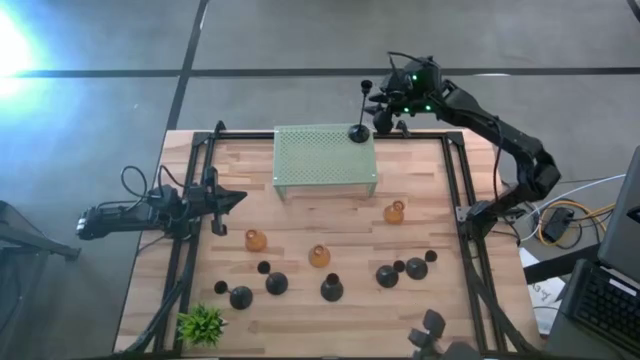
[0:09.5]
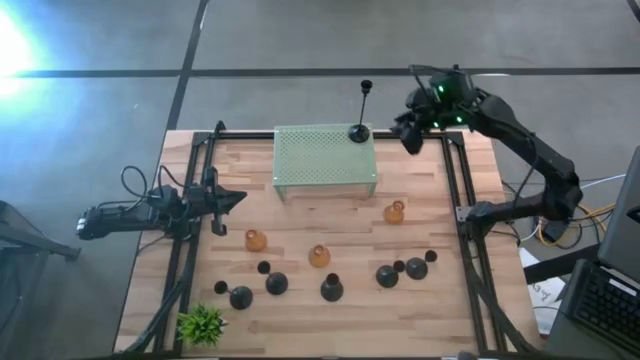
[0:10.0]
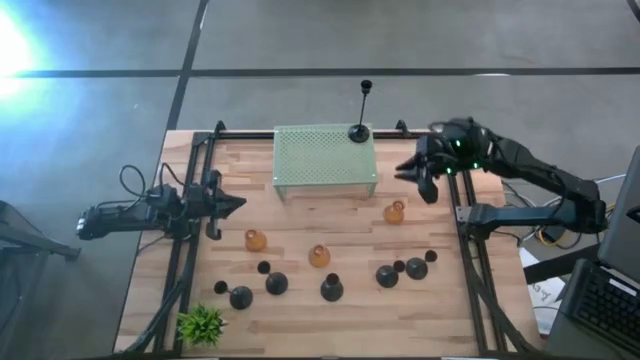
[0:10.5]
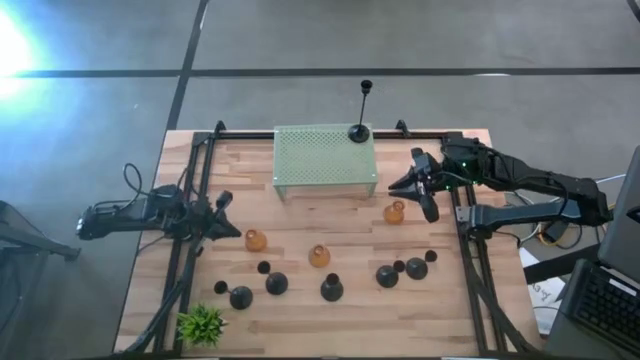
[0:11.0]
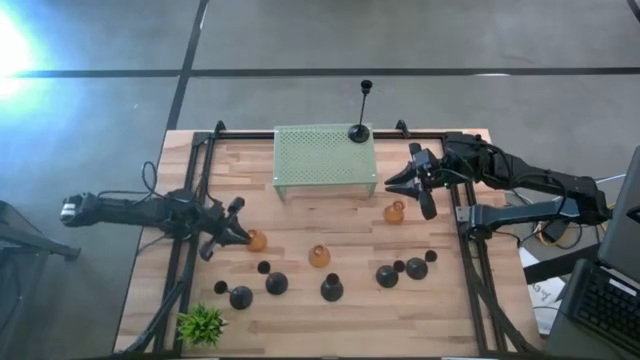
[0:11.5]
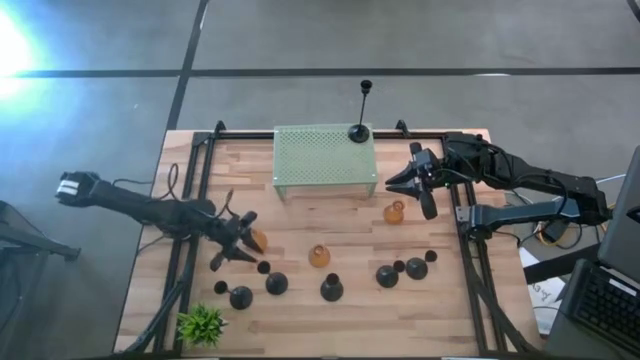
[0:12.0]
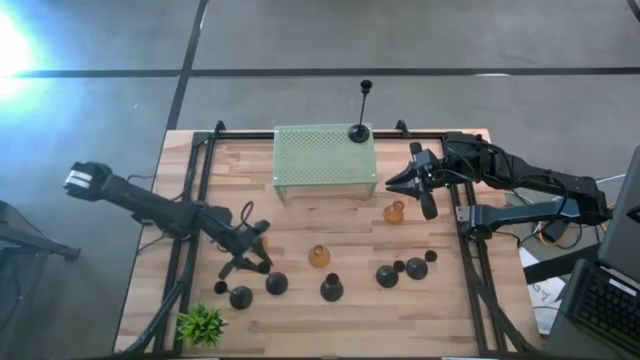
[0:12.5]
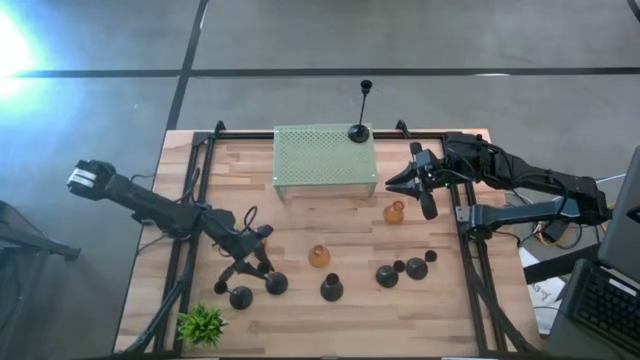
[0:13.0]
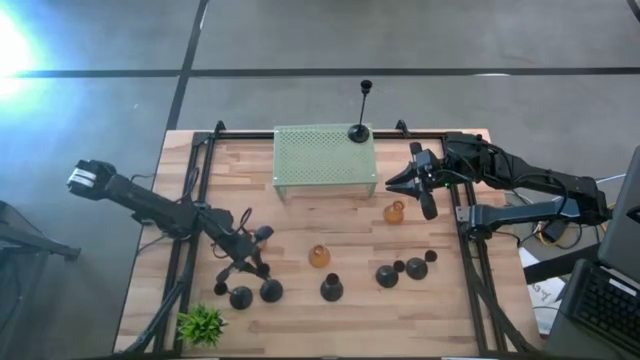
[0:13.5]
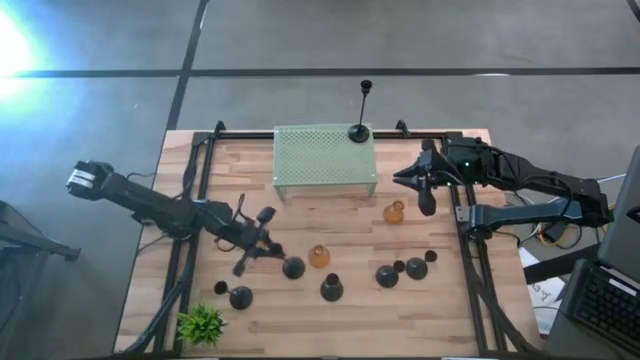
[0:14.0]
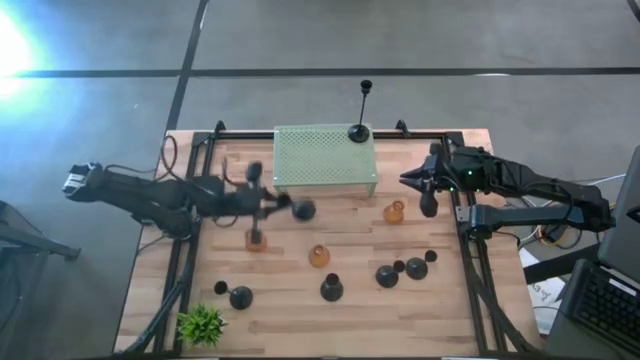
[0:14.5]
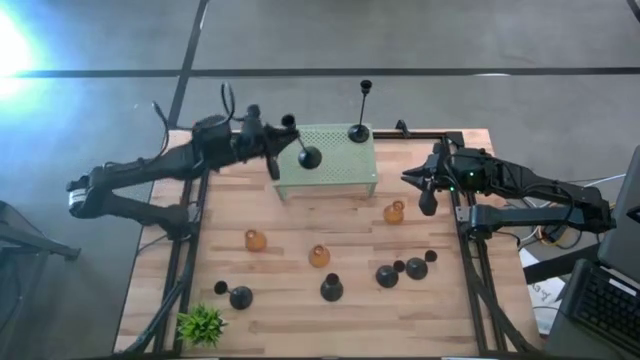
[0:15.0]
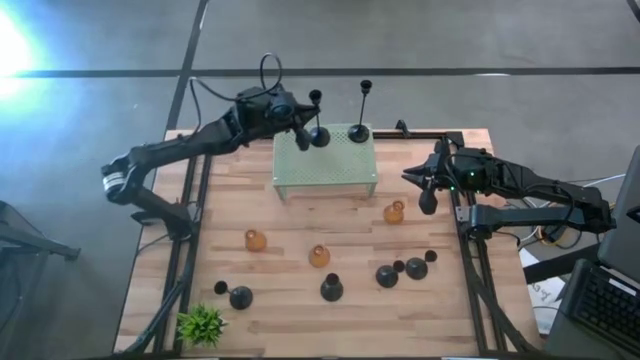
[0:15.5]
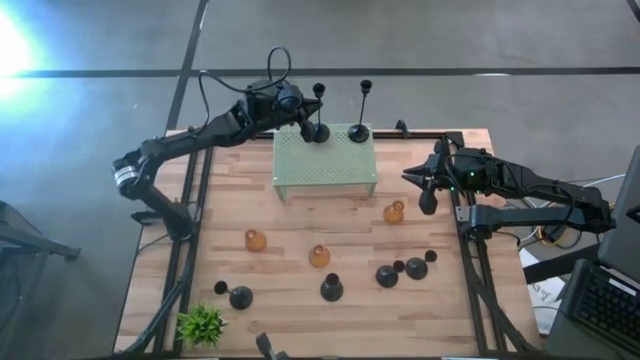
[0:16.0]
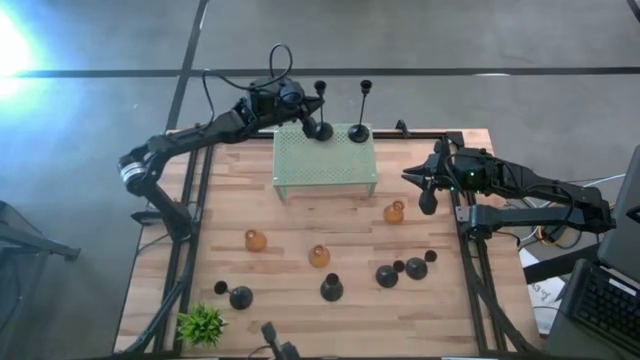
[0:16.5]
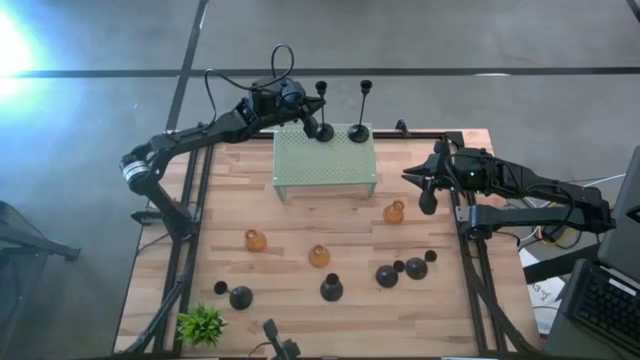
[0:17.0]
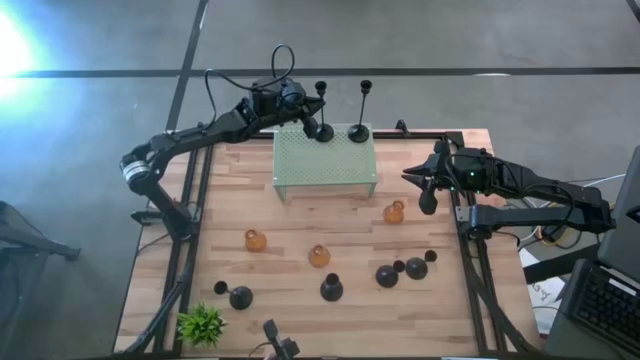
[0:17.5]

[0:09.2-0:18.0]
Task: Pick & Place candle stick holders
Align the large black candle holder with the other large black candle holder on the shelf

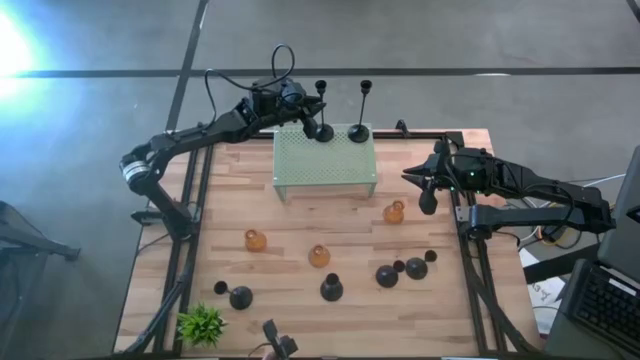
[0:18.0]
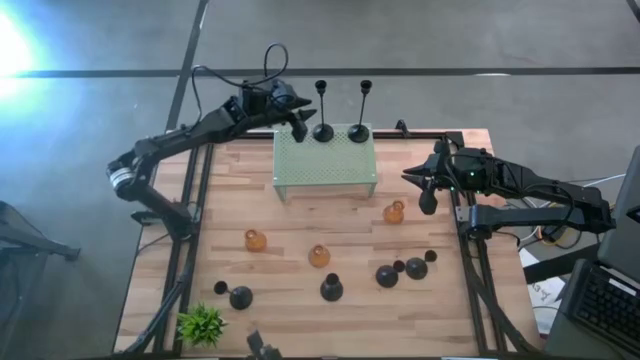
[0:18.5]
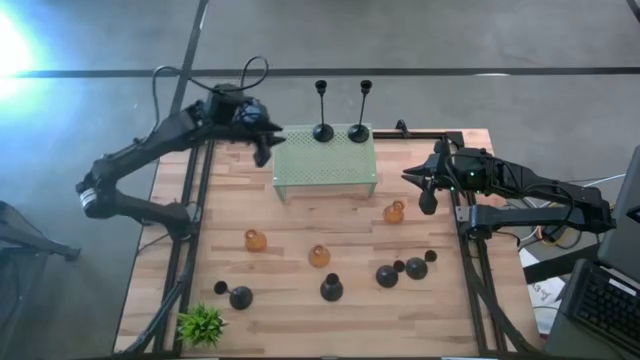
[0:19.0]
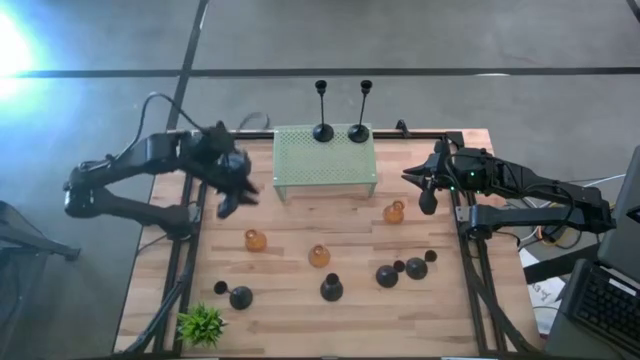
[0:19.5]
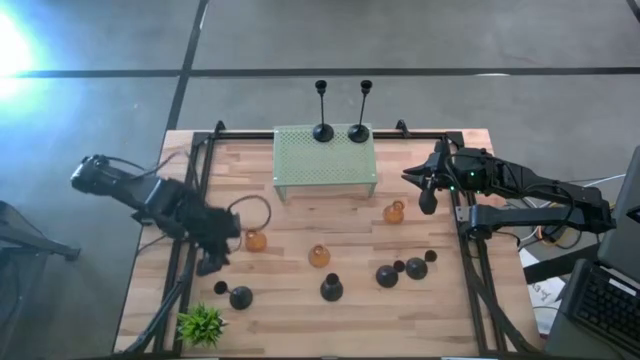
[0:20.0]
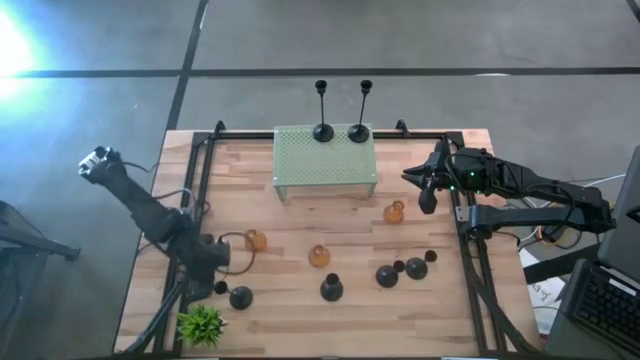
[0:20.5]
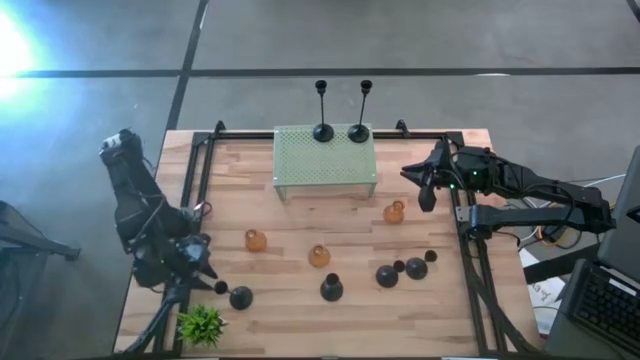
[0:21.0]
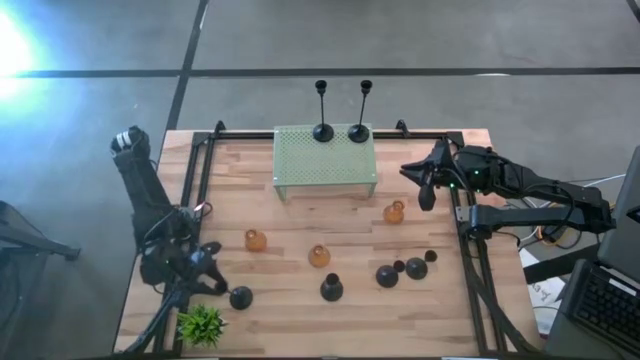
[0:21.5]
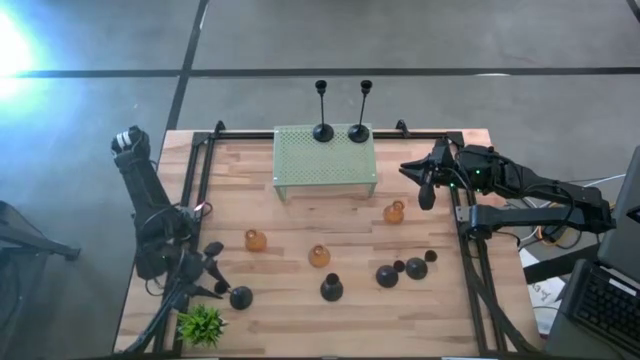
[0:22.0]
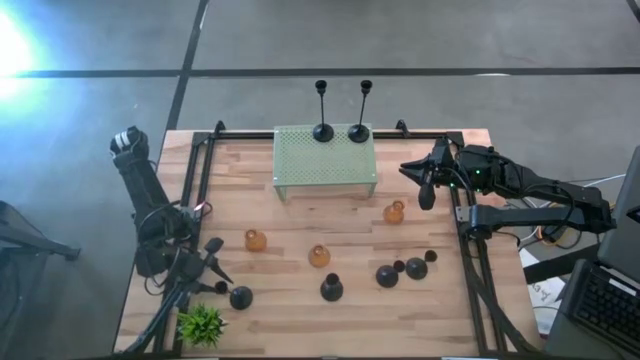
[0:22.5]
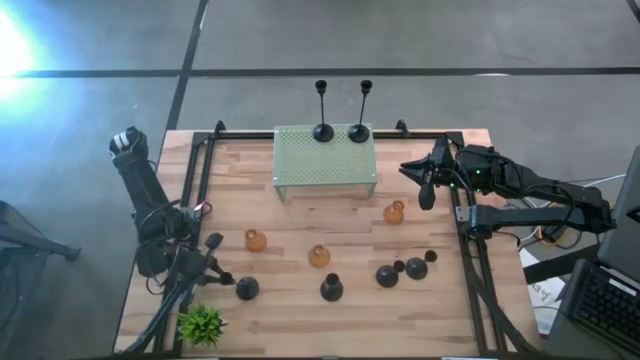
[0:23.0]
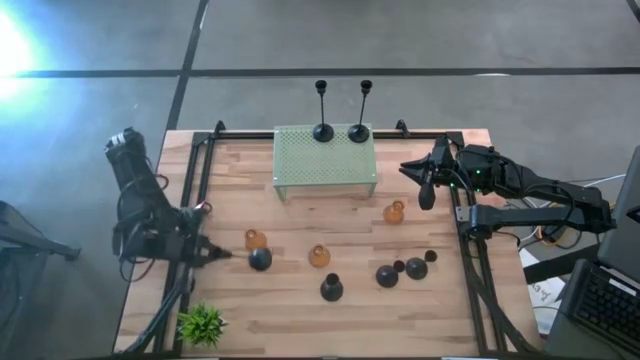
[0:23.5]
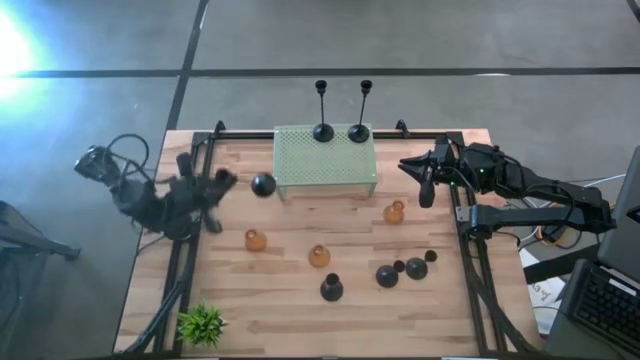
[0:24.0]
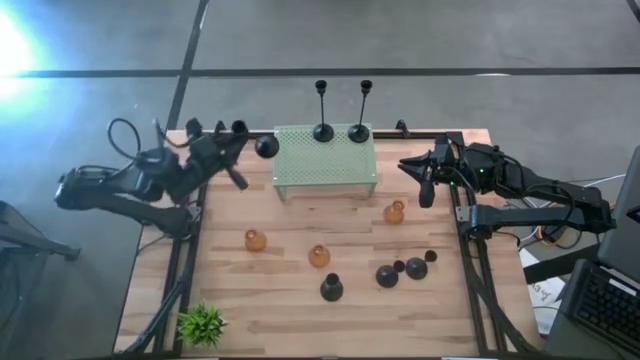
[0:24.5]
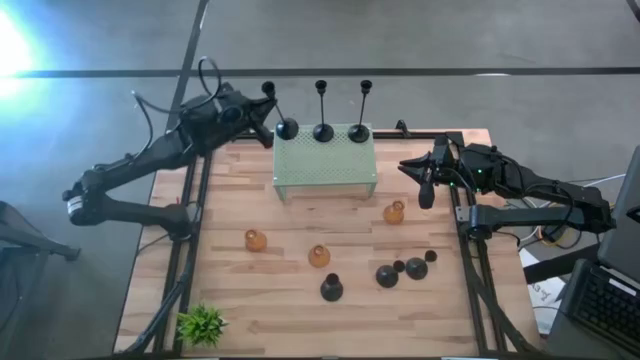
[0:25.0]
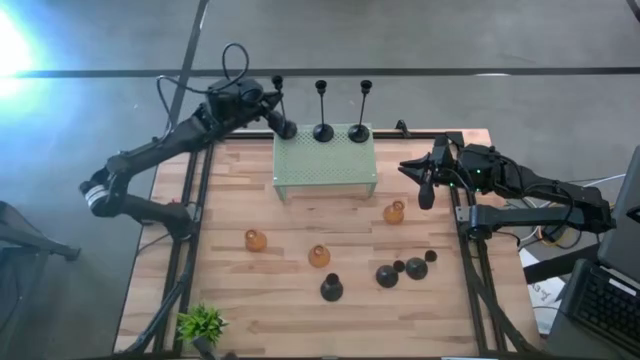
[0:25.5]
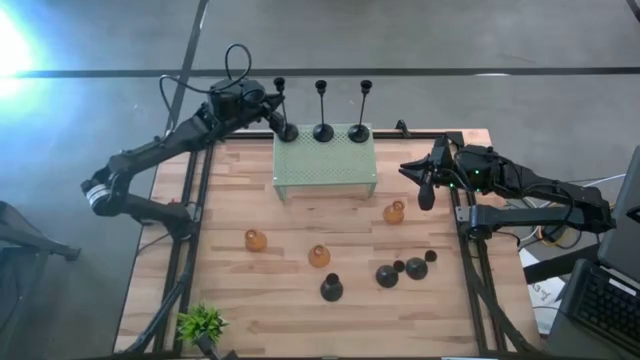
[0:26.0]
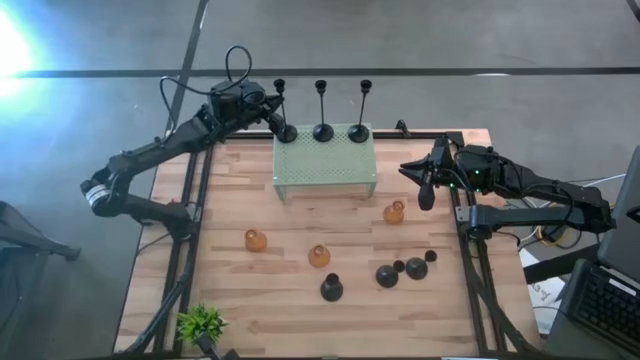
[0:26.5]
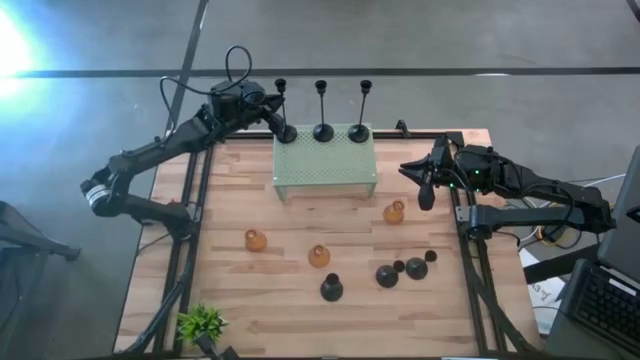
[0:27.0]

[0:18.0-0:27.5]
Align the large black candle holder with the other large black candle holders on the shelf

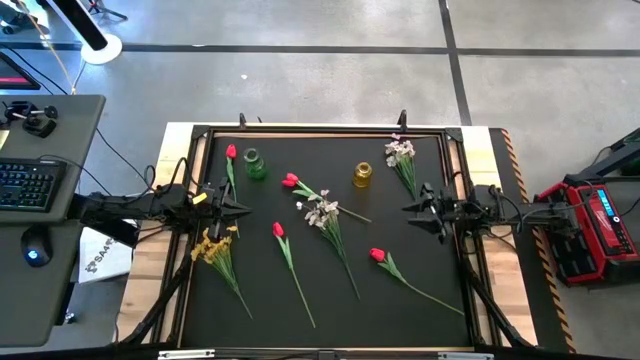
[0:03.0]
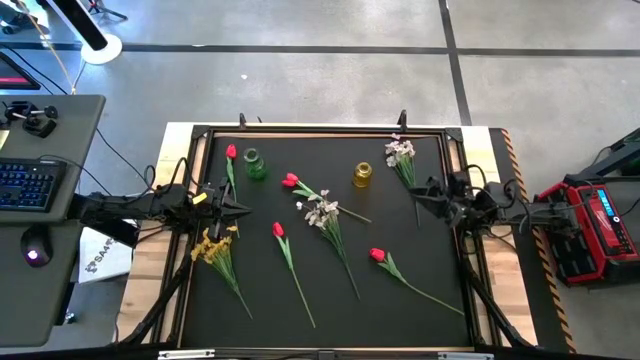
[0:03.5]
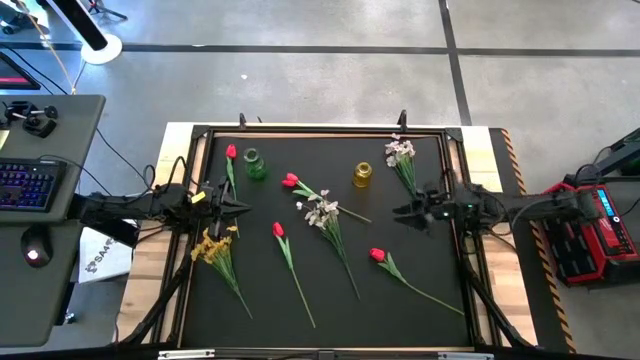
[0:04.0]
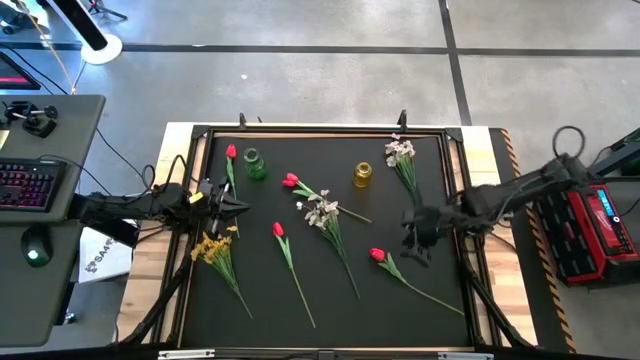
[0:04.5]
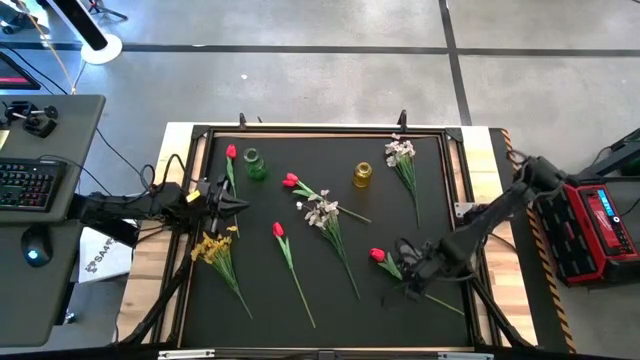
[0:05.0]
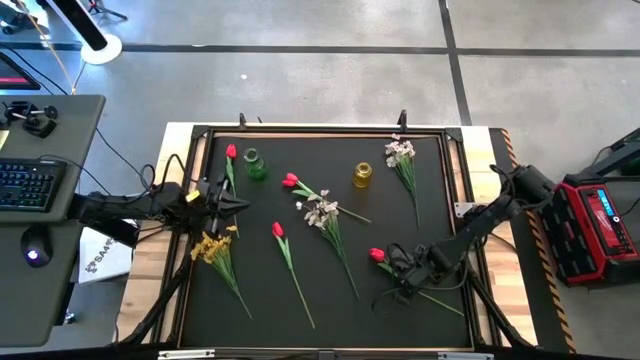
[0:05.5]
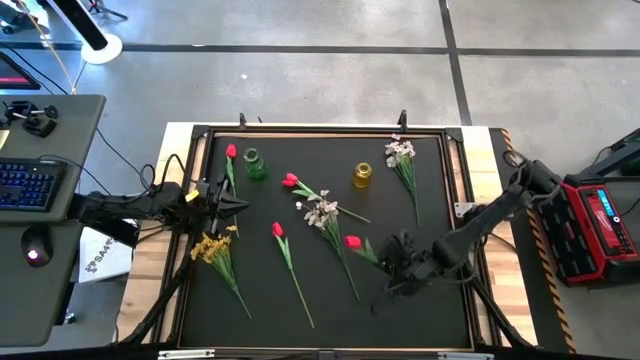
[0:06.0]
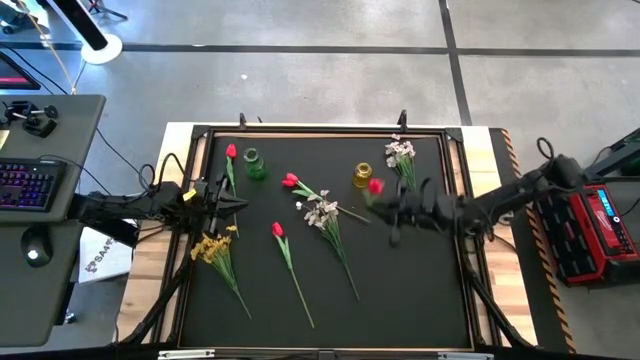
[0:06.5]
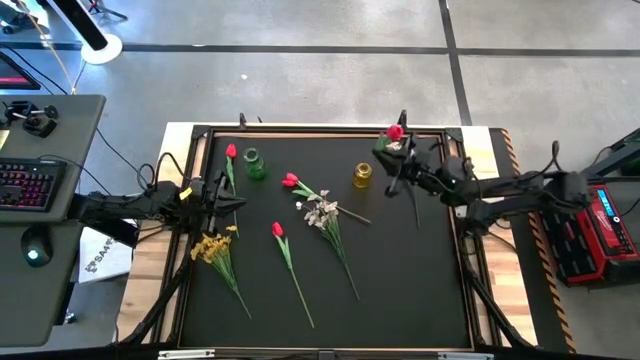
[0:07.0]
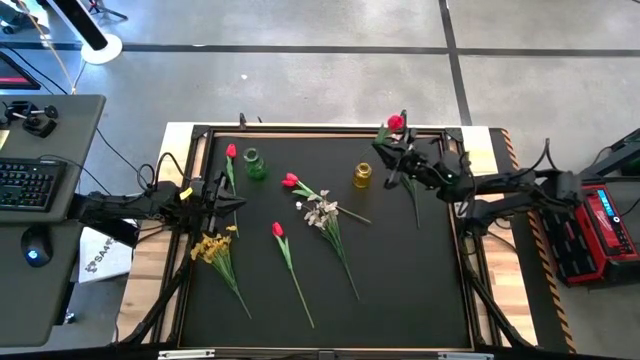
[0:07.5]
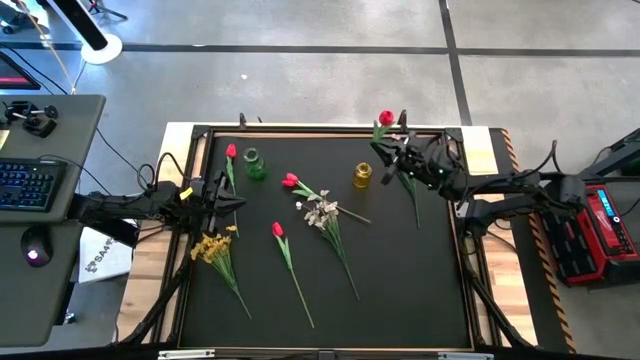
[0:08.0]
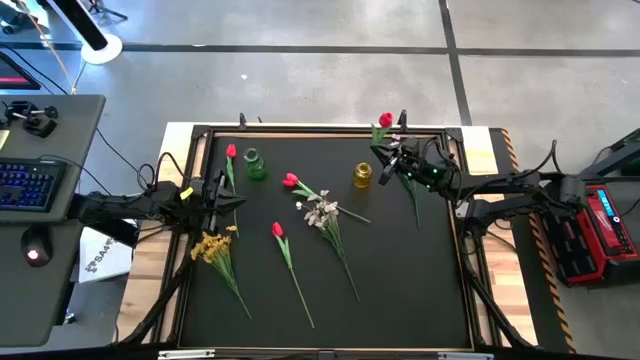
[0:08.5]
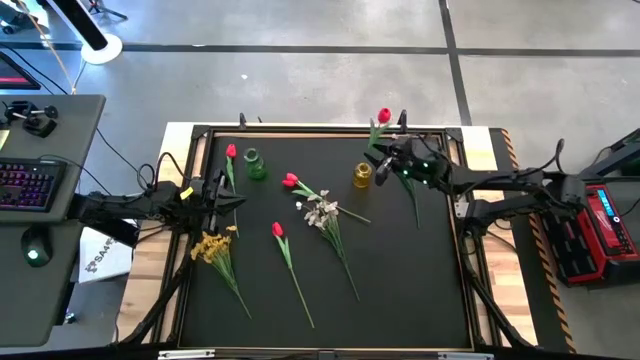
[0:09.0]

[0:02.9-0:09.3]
Task: Sort flowers into vase by color
Put the bottom right red flower into the yellow vase
